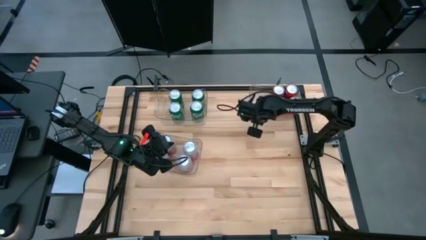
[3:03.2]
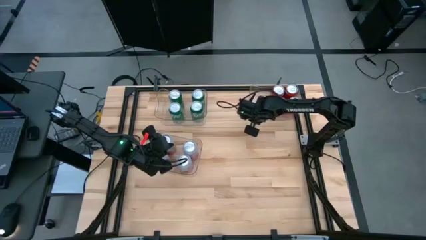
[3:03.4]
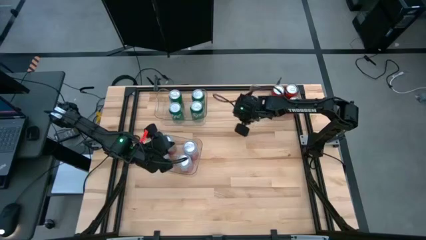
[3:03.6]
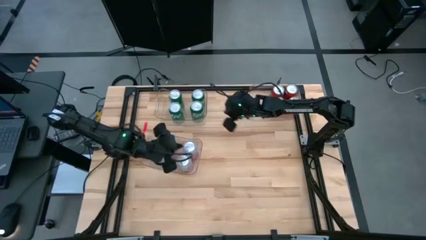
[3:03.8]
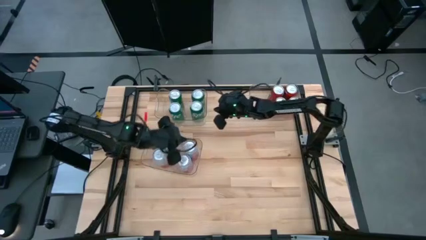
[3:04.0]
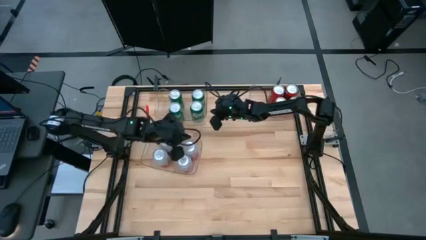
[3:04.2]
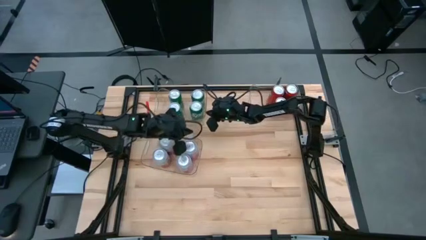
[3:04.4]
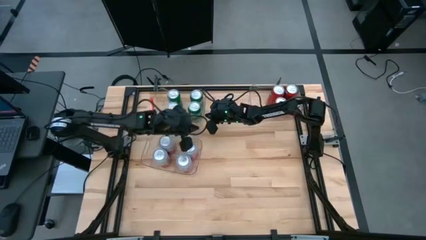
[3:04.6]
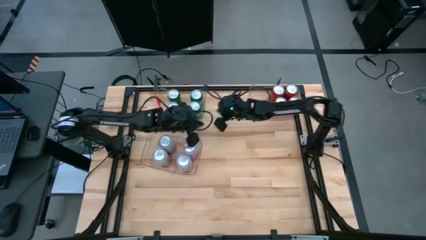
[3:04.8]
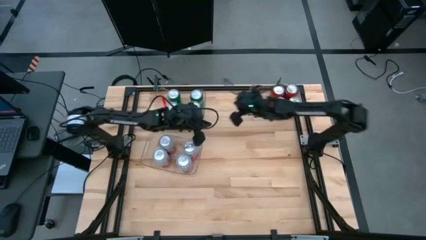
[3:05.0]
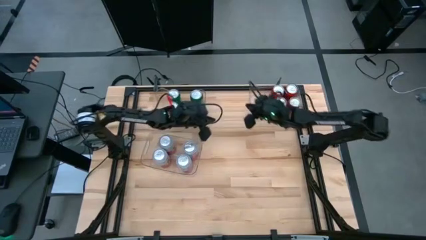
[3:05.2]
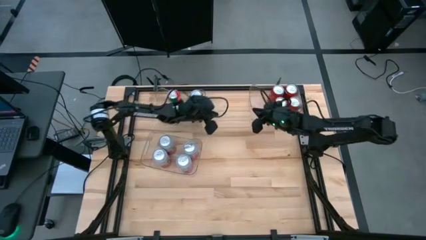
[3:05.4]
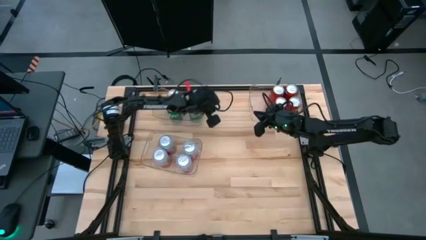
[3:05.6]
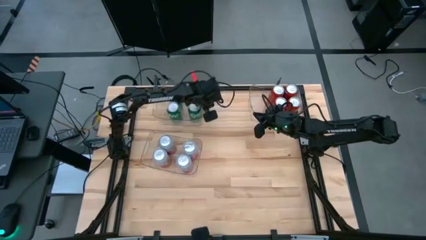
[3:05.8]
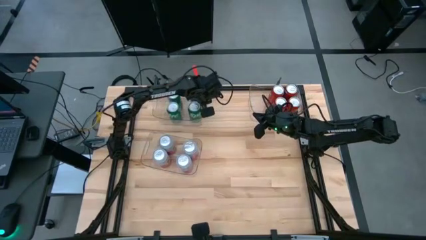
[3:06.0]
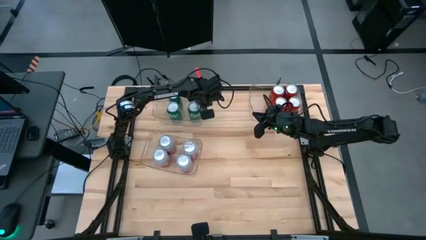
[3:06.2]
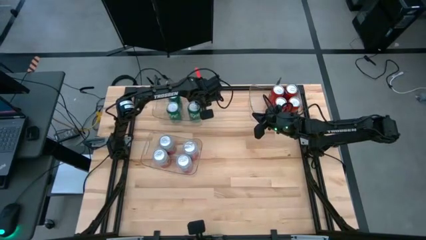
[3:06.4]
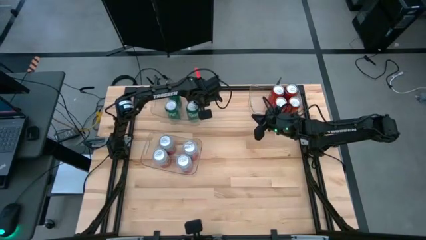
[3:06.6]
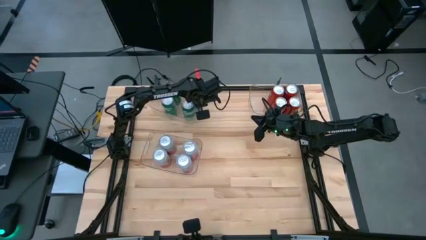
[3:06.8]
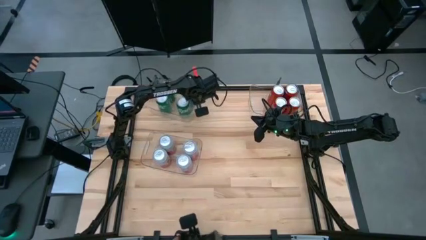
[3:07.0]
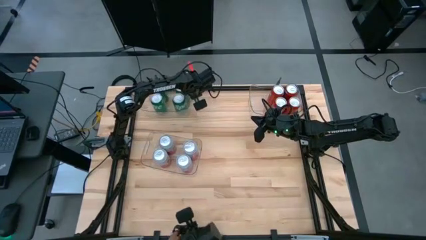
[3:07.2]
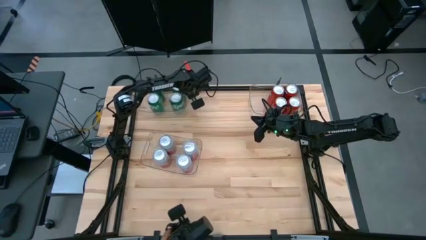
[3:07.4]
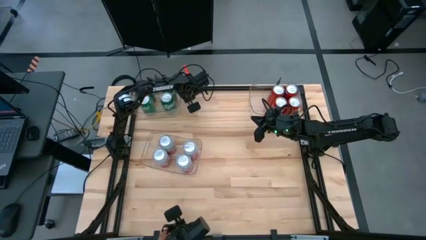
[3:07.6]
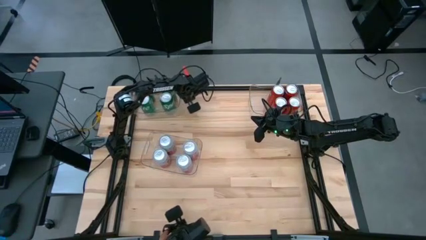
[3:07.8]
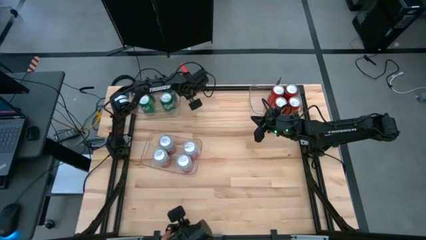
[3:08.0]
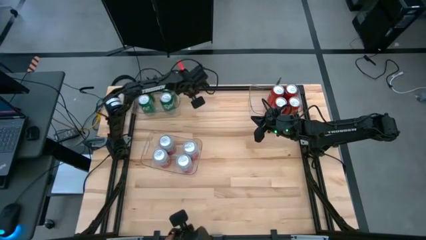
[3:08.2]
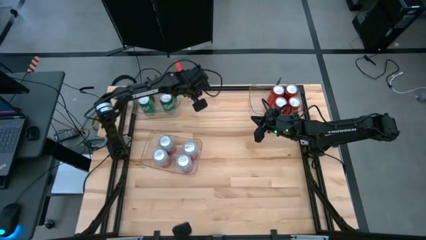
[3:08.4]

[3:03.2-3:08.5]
Task: Sort soda cans
Adjust the top left transparent bin

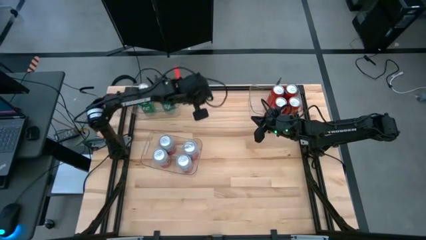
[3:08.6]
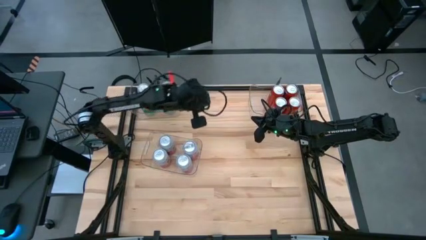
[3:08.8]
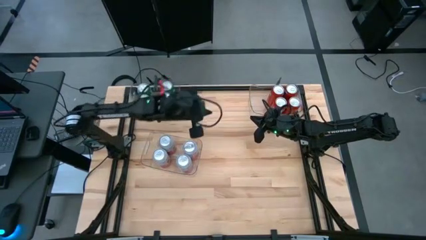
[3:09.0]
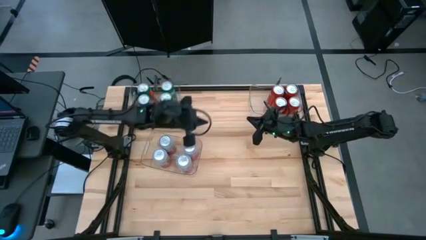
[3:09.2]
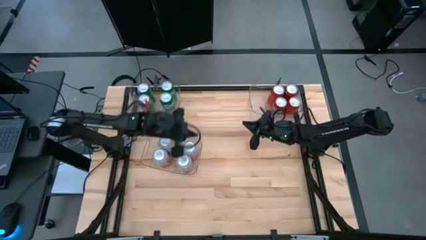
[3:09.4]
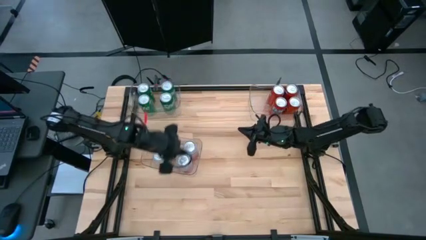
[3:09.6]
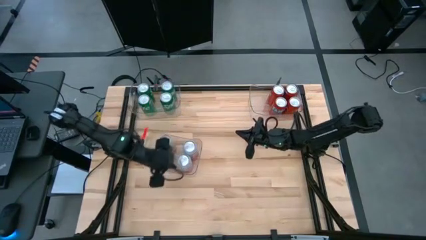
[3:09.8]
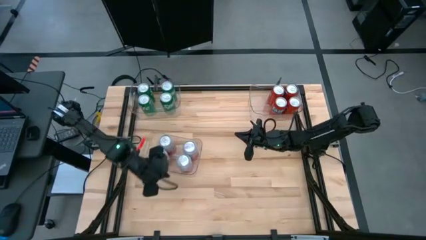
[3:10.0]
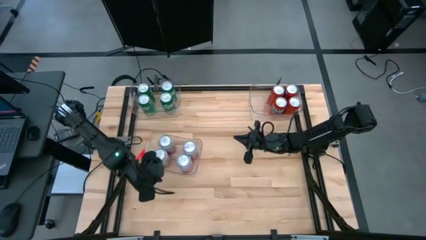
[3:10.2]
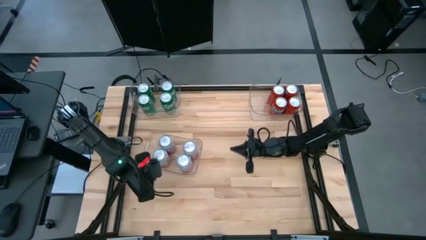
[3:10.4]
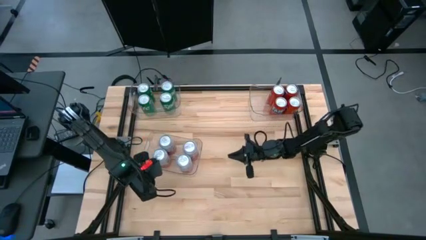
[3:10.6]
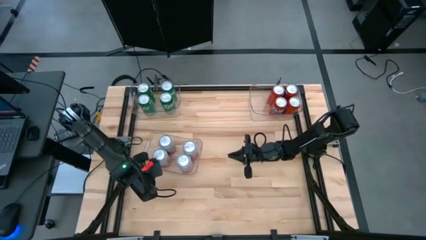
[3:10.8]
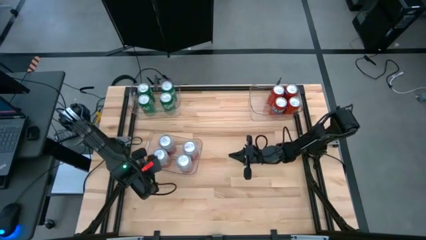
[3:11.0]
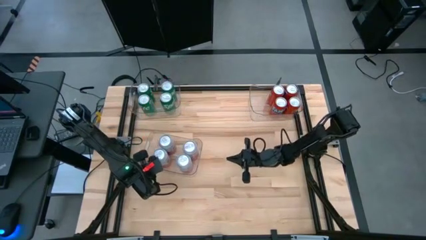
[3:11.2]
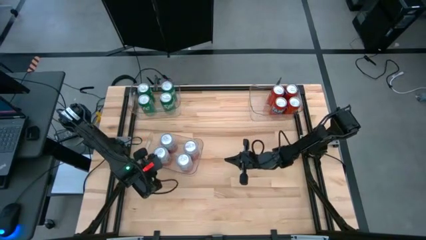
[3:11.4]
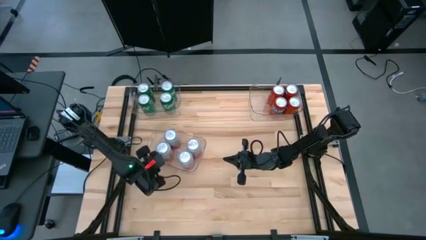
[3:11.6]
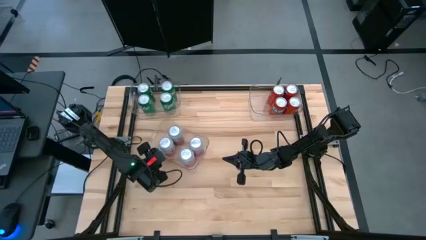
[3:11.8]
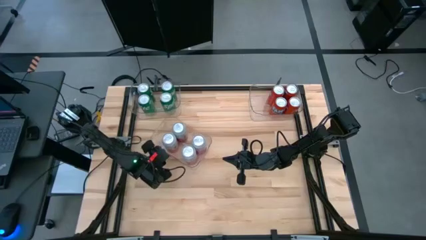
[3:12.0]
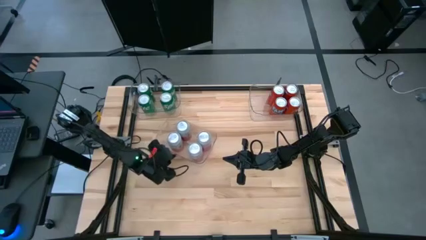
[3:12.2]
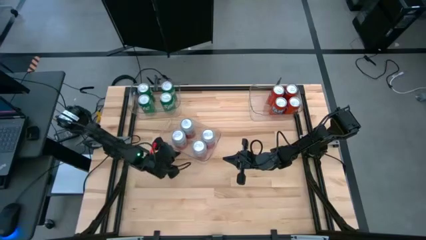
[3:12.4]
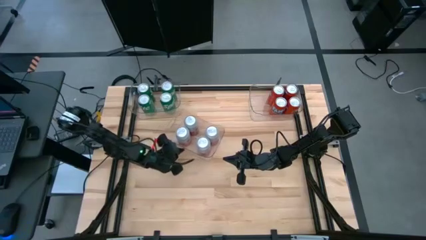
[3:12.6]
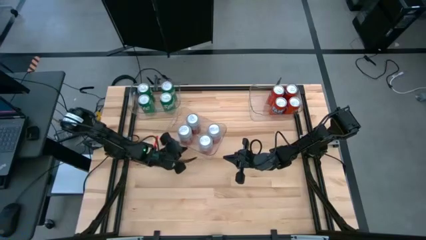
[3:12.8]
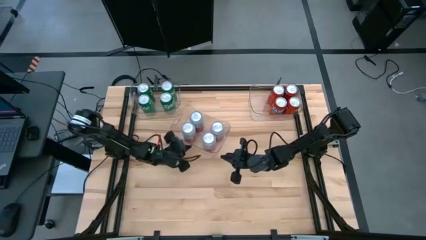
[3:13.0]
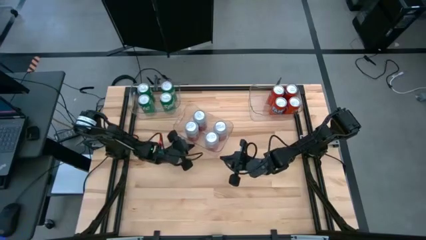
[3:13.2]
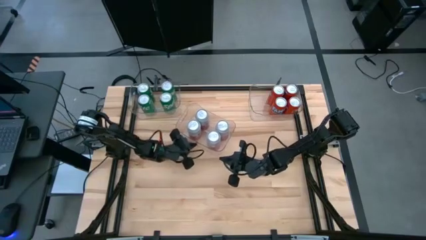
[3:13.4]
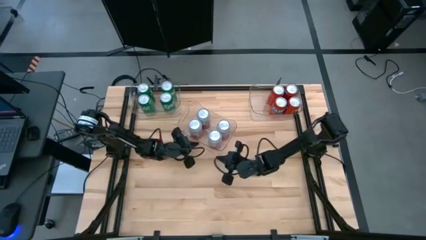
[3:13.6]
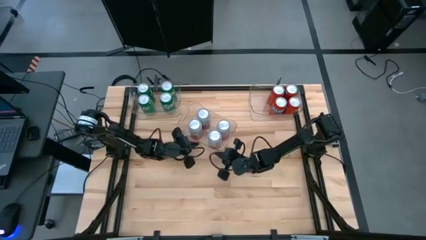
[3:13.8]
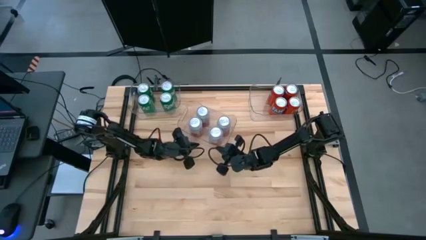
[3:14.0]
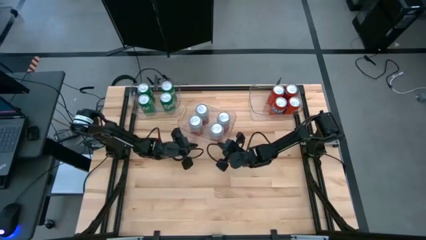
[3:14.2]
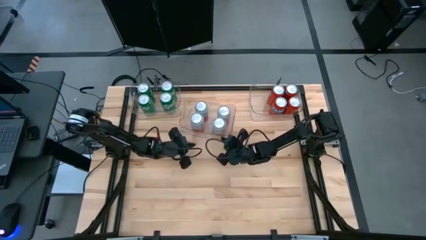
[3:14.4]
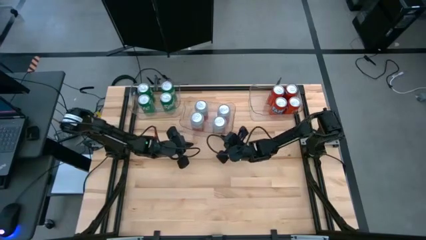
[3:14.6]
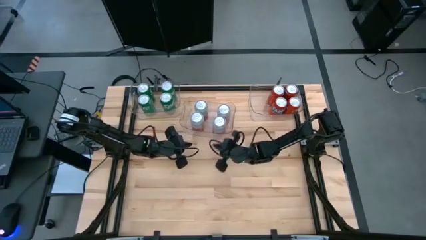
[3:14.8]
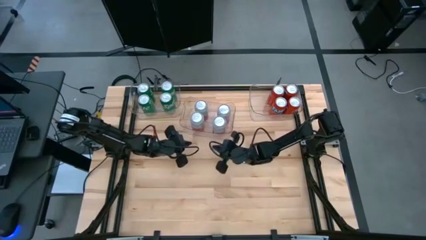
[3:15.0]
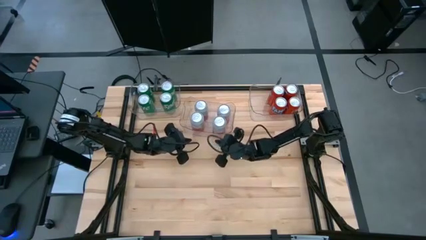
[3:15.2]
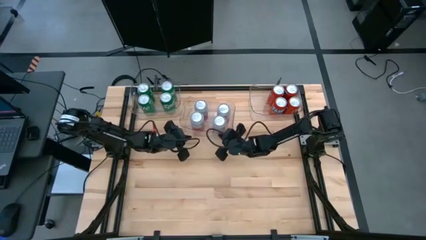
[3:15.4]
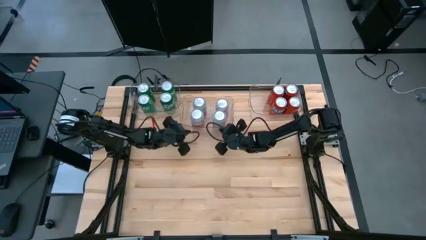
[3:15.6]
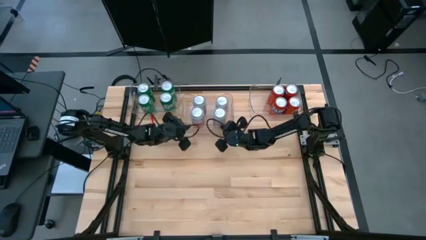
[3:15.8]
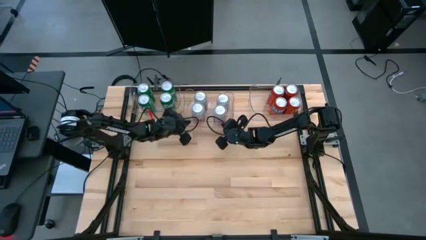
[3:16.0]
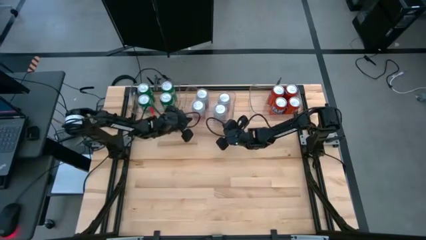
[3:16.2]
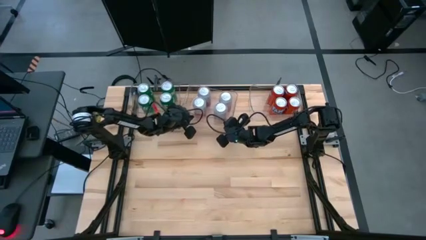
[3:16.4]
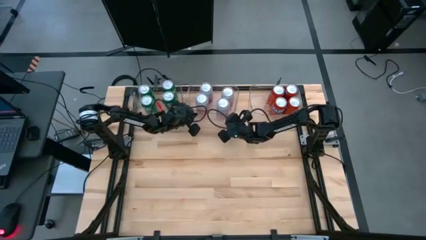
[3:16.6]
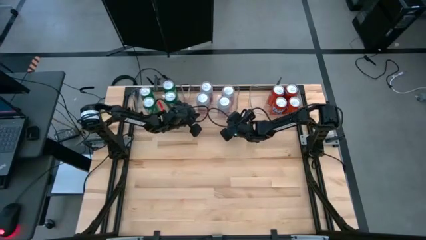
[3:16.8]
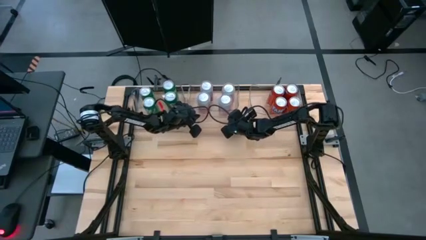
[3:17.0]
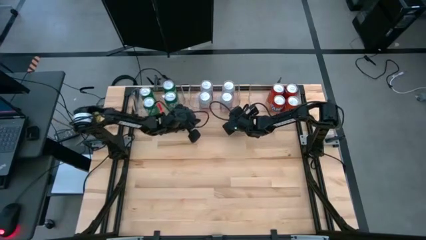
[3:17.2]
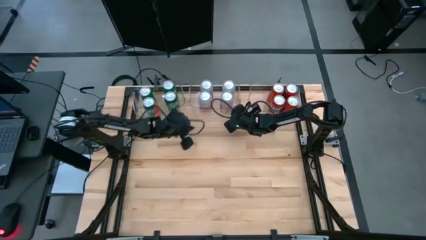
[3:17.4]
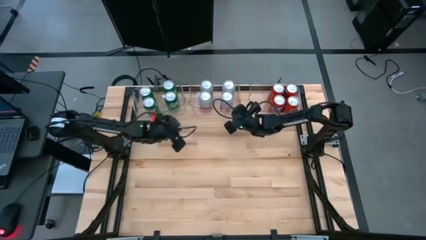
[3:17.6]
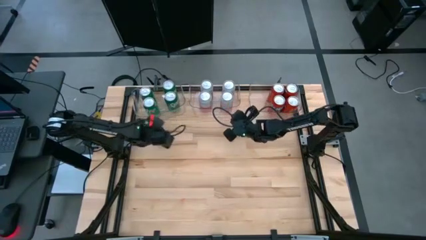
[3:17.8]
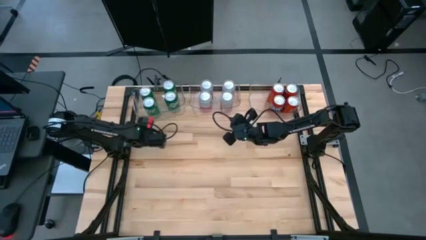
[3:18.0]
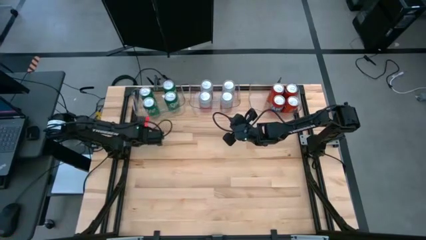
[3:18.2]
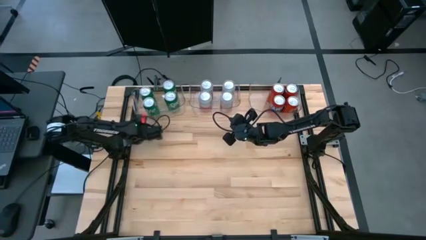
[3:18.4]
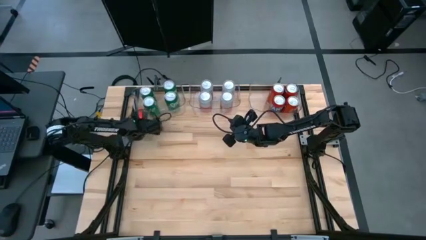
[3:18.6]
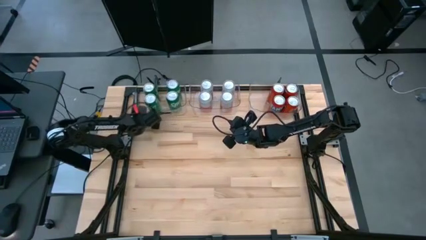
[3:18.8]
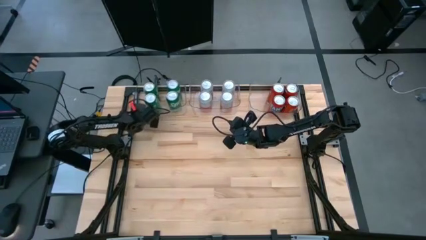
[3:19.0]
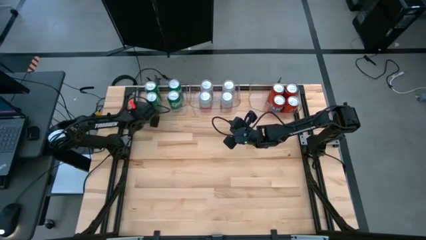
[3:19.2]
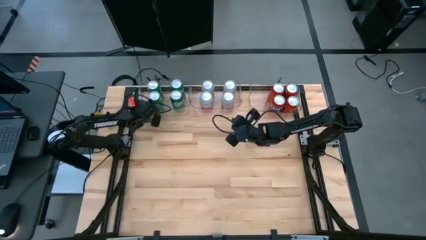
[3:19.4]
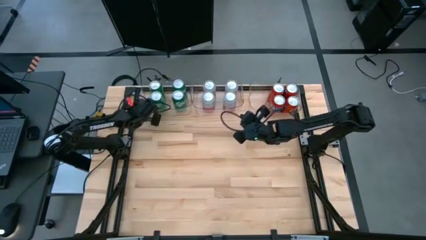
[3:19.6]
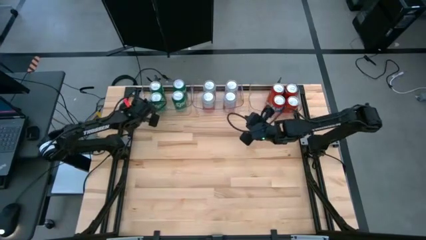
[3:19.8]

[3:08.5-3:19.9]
Adjust the transparent bin from middle left to top center
